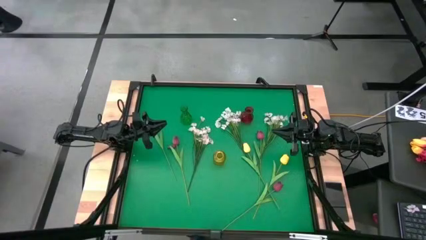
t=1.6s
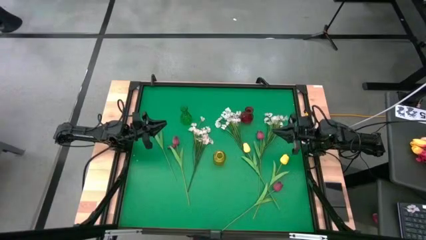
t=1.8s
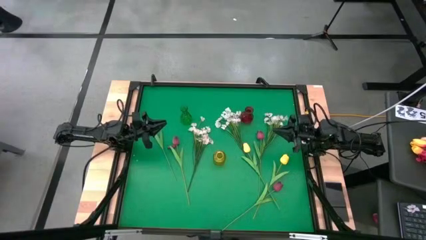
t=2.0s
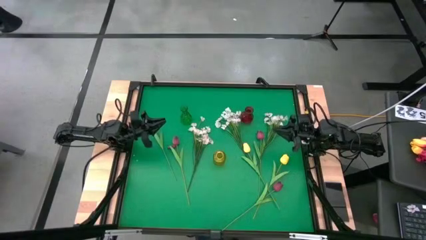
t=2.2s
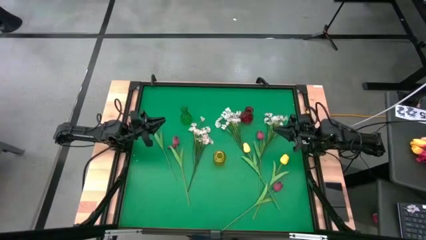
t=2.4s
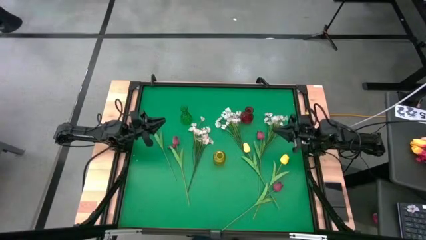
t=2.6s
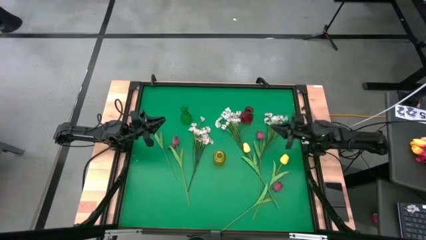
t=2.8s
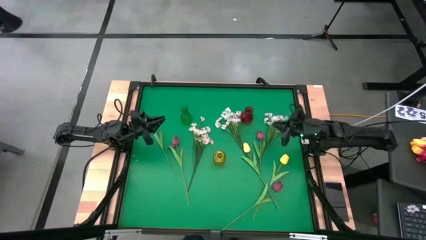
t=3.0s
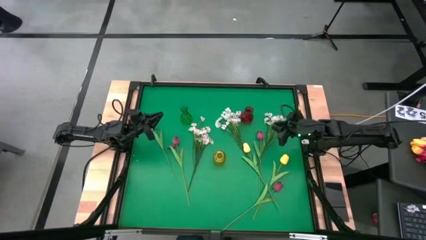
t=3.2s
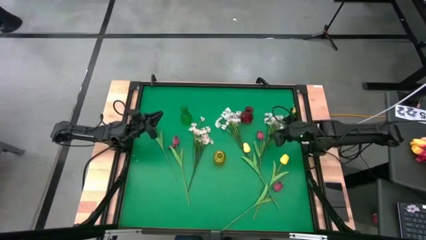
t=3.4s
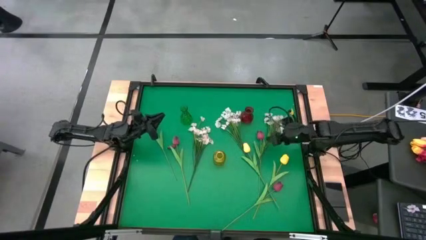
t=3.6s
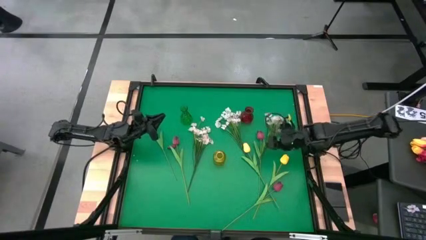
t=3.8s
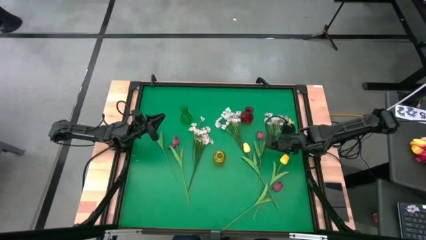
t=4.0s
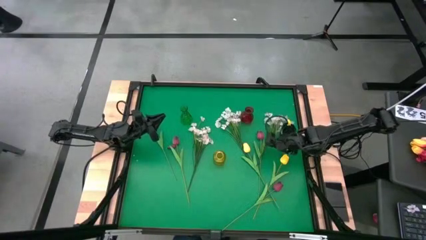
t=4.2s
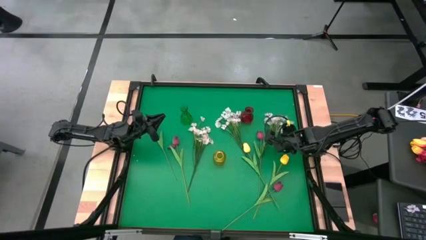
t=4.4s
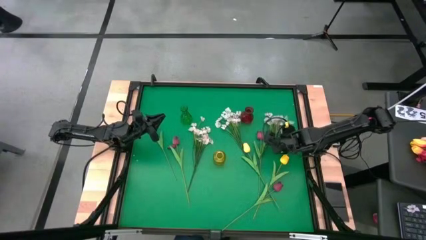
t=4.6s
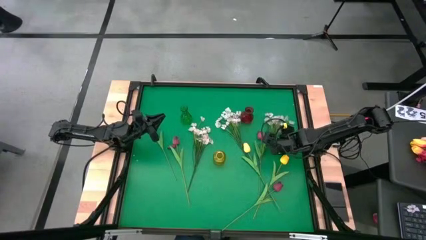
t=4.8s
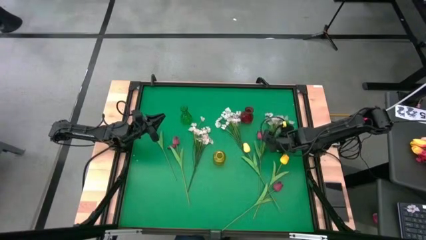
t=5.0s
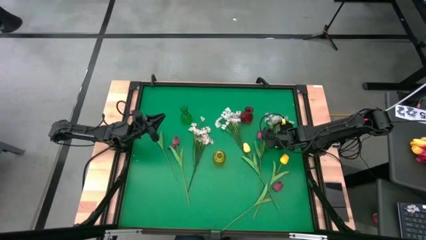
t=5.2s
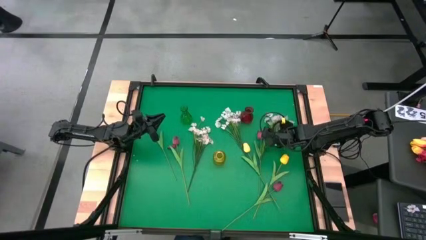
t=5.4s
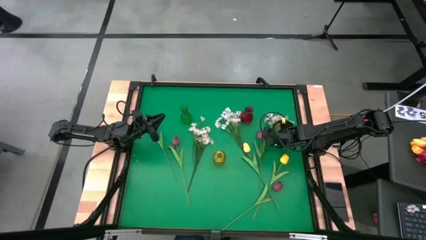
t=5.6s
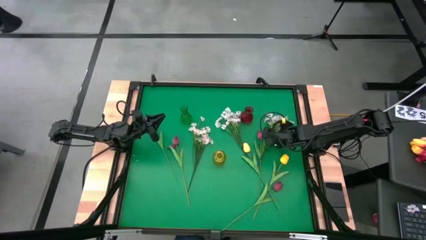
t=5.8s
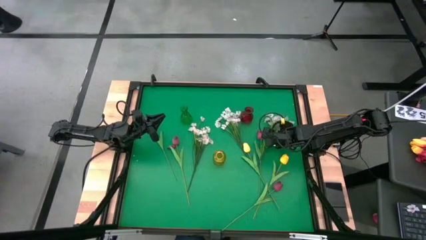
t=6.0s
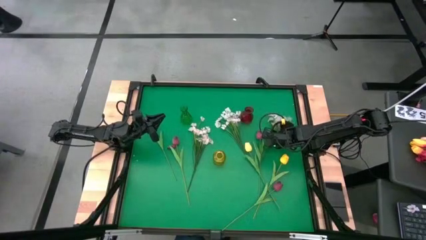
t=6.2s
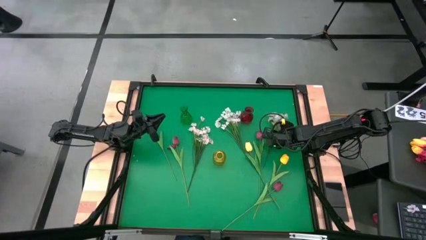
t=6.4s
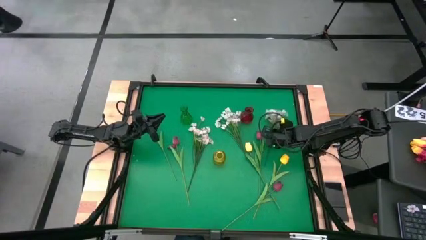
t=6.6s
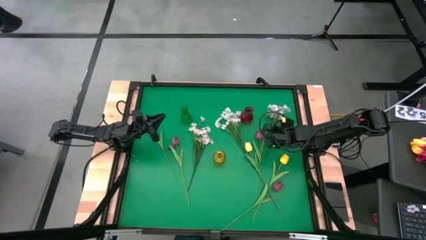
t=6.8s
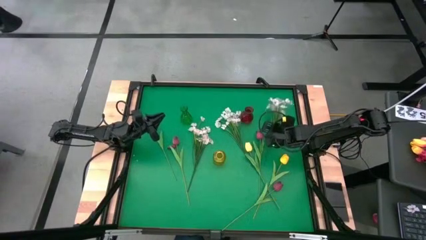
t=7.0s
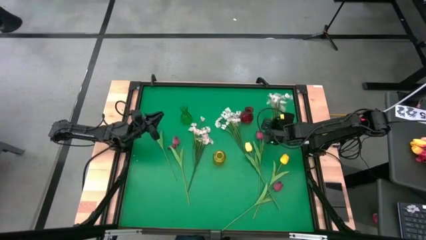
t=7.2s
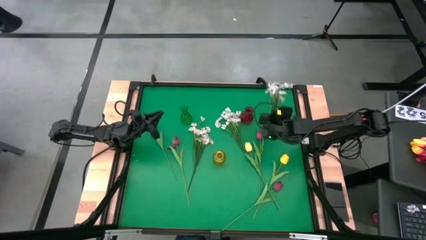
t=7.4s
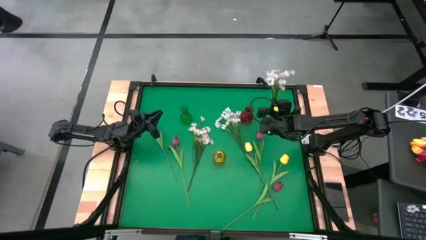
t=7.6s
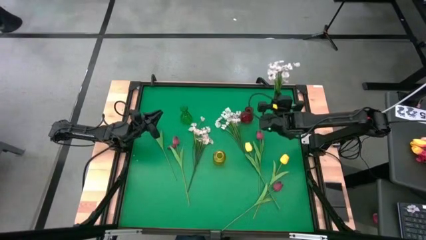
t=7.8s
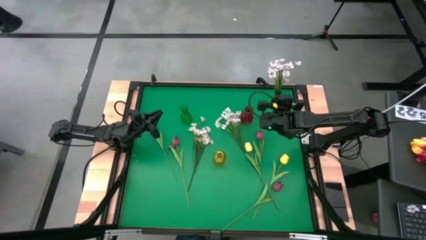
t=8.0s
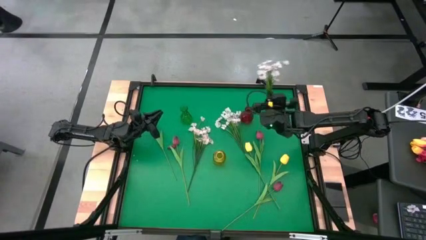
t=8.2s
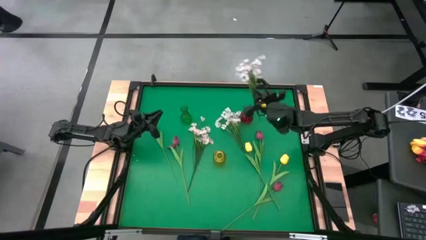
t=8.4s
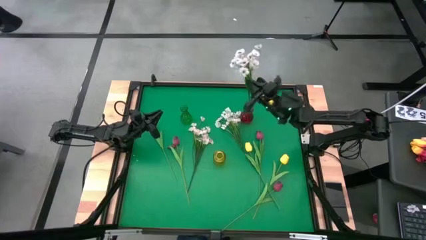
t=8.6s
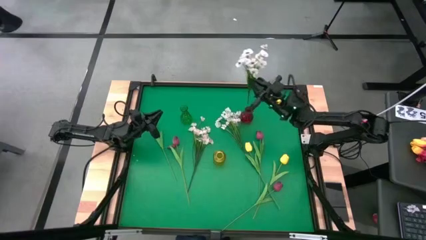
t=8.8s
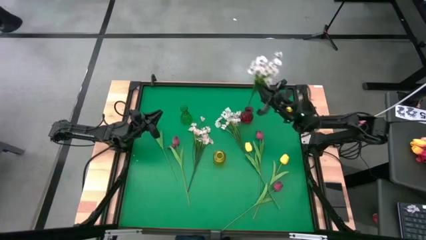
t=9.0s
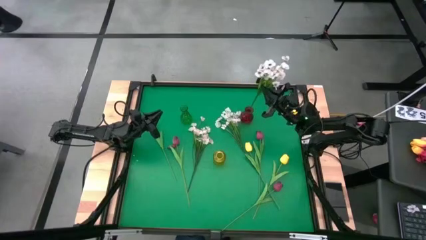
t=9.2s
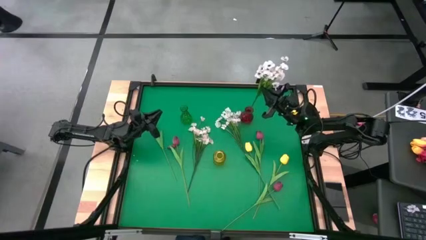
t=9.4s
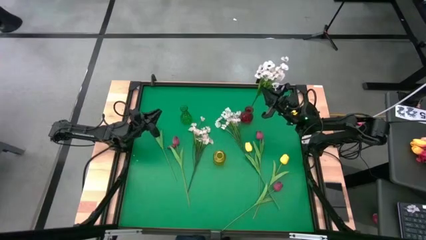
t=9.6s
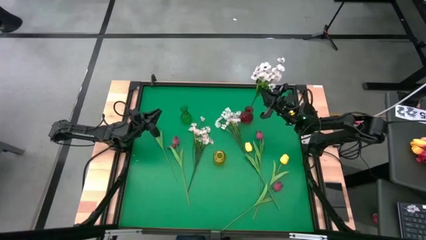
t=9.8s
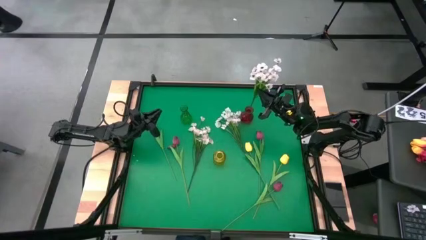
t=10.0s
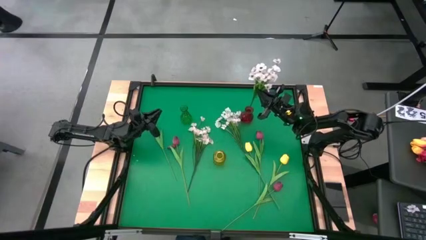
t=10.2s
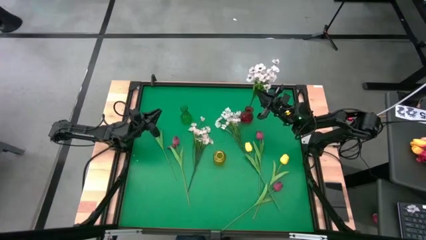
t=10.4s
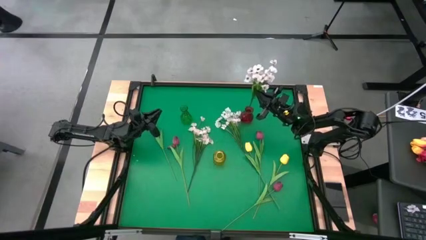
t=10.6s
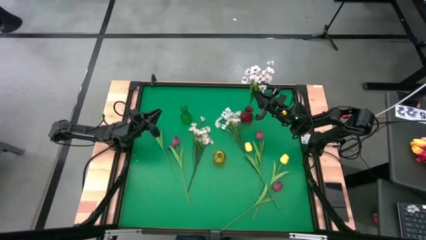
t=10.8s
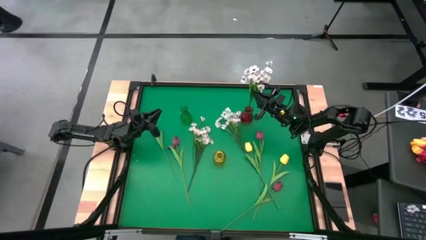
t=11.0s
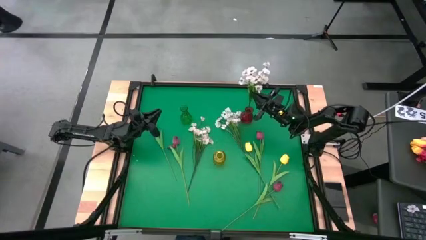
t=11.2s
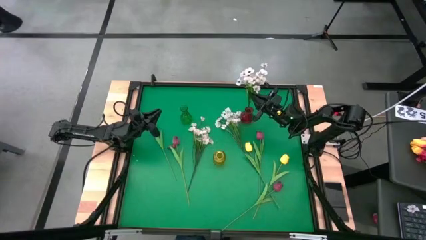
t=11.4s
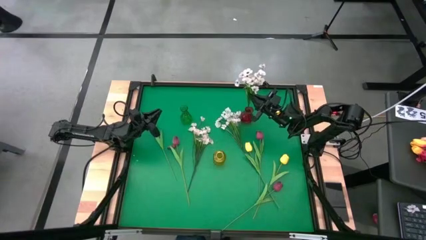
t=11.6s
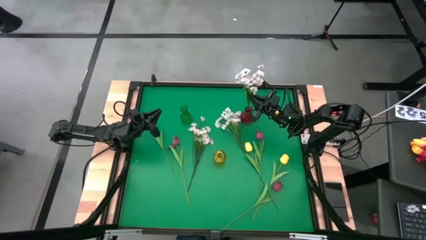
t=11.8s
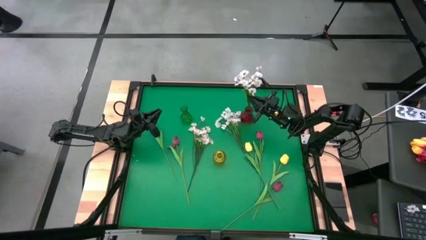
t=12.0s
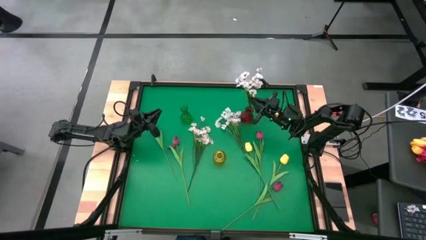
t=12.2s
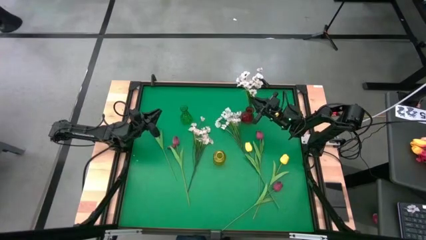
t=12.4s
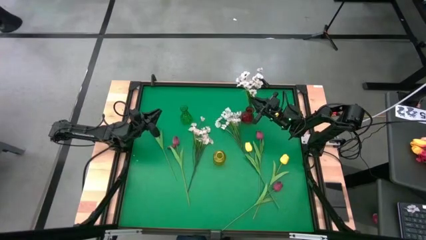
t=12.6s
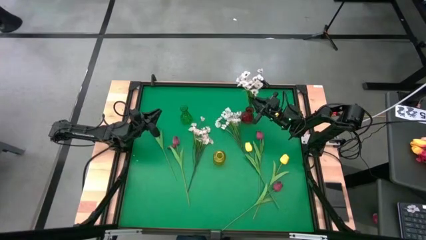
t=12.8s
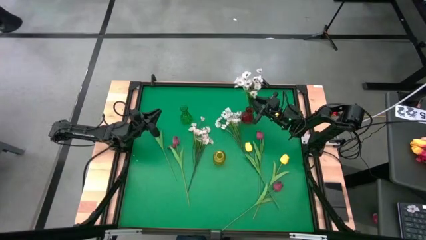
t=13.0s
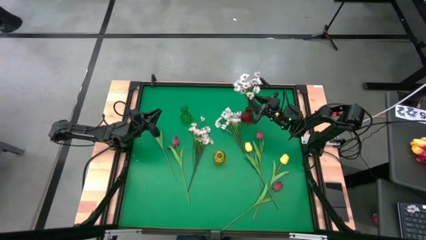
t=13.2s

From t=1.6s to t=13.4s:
Task: Sort flowers into vase by color
Put the right white flower into the red vase
